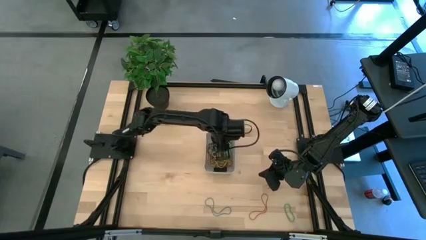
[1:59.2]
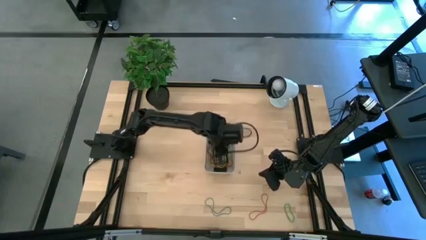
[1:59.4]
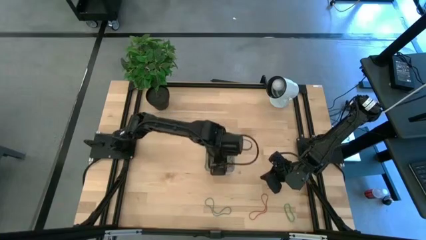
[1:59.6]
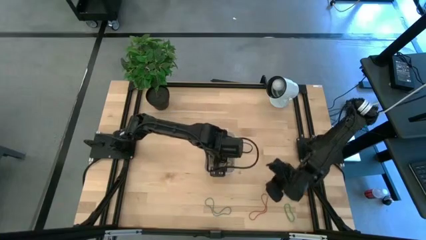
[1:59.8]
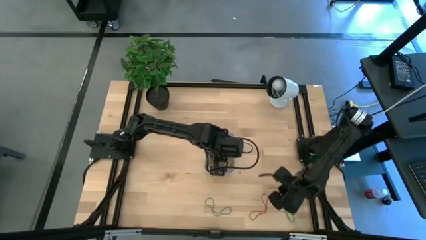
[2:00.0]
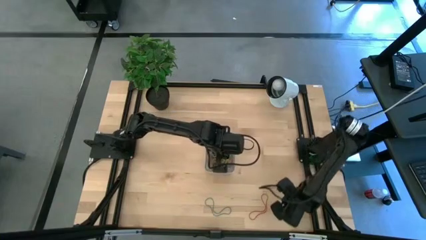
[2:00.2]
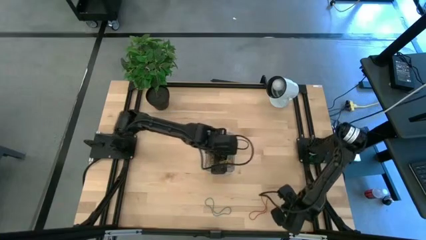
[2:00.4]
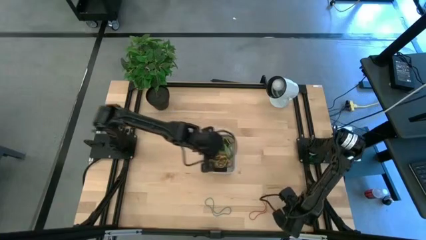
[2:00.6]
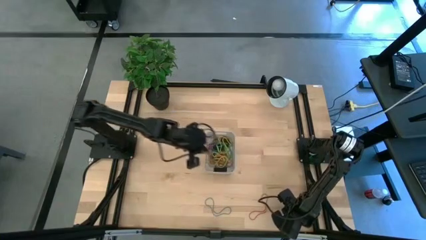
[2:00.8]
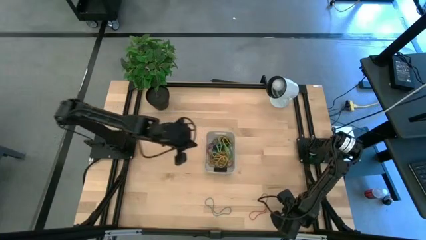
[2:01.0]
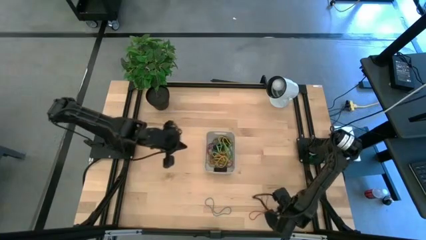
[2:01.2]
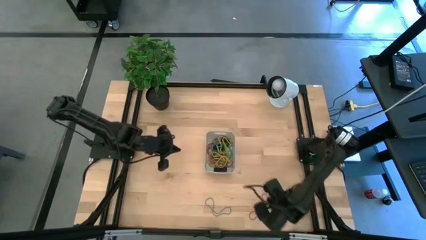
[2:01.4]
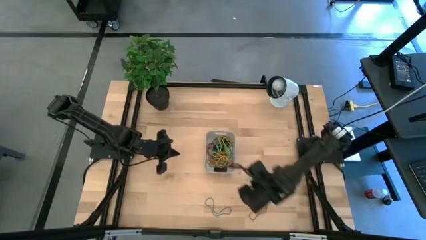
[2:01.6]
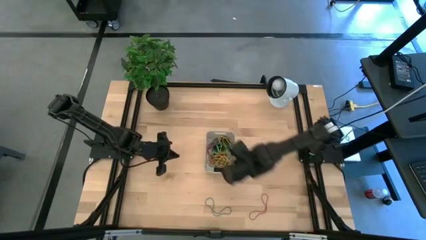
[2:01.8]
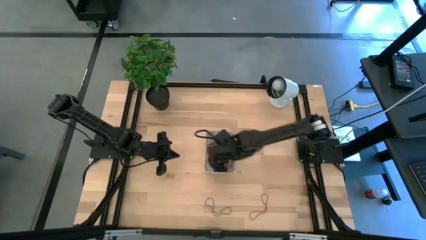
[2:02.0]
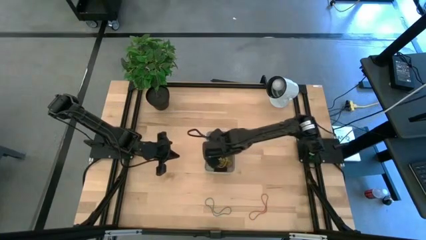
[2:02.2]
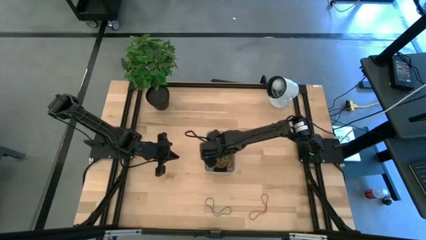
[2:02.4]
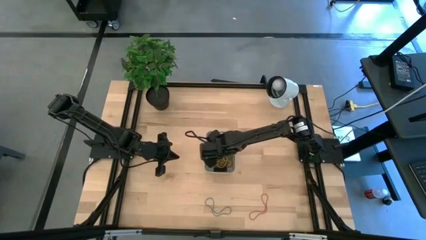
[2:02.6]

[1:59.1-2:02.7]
Task: Pick and place rubber bands into bin
Put the green rubber band into the gray bin

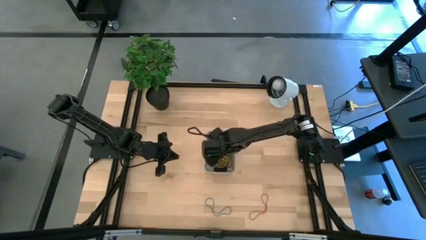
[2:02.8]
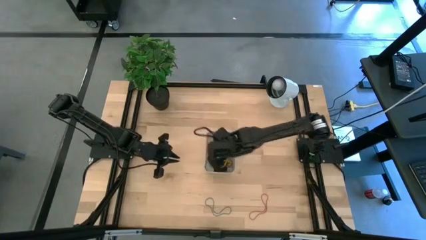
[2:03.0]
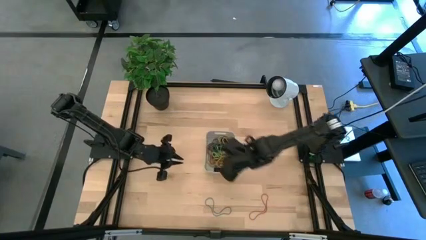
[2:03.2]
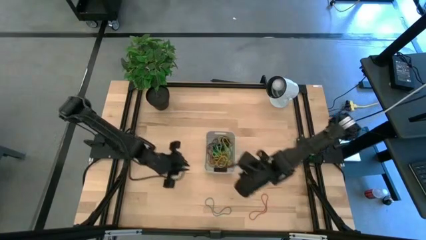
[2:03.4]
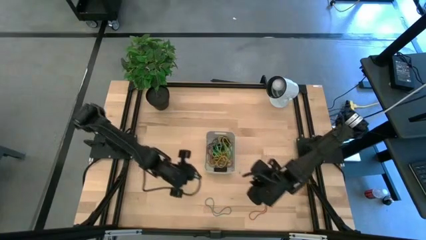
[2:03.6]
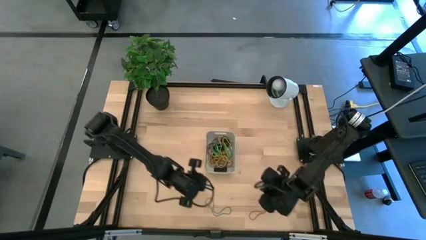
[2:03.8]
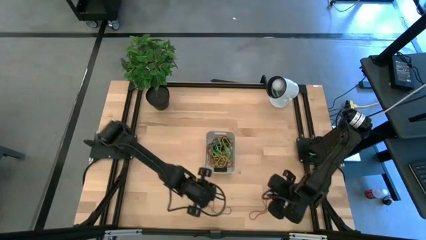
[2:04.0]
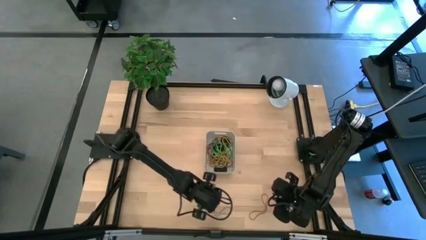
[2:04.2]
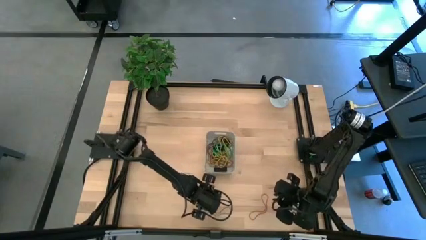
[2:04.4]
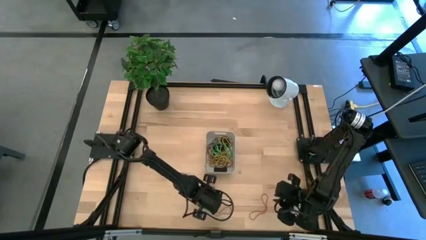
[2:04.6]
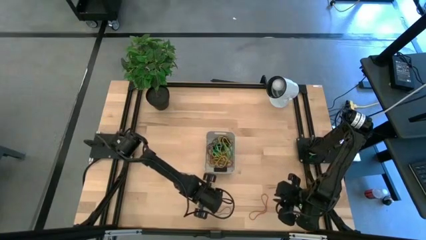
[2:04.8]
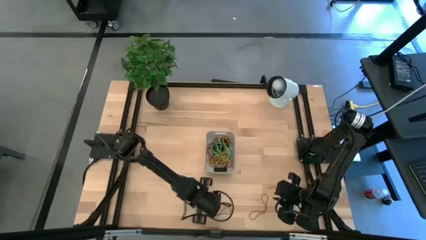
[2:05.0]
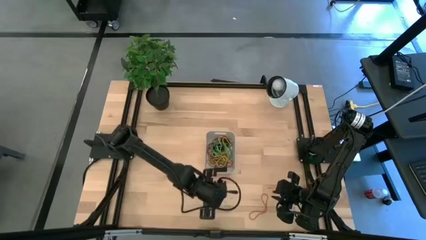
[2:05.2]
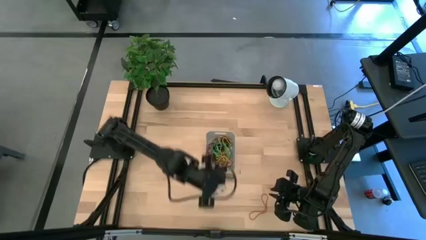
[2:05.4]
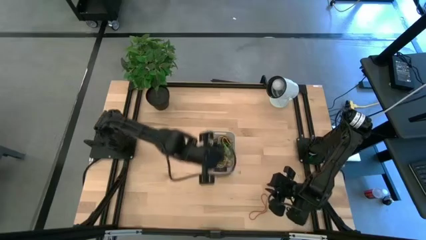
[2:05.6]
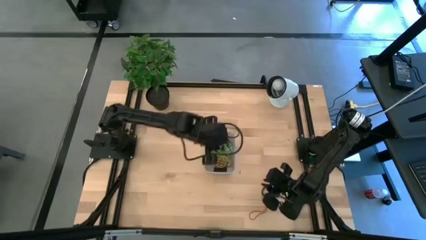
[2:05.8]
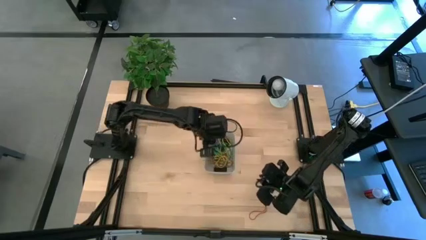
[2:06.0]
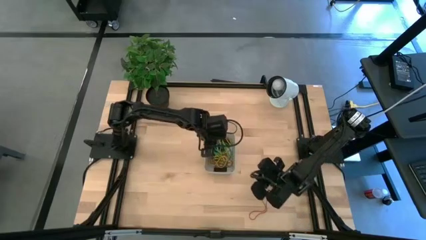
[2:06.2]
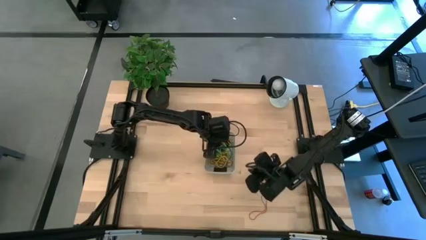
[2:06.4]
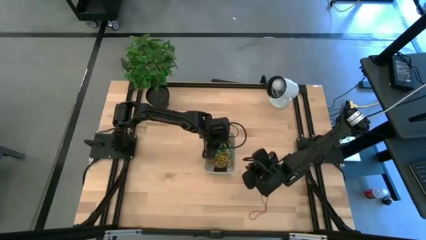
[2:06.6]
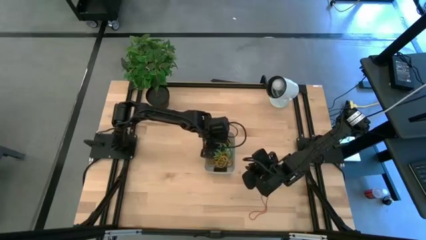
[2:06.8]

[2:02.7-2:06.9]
Put the blue rubber band into the gray bin

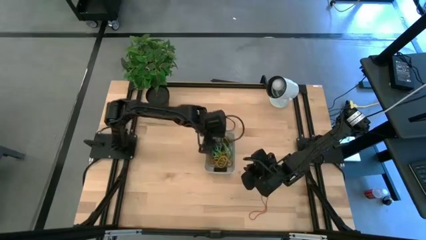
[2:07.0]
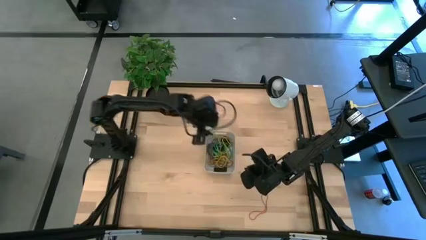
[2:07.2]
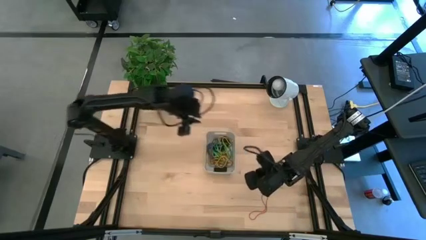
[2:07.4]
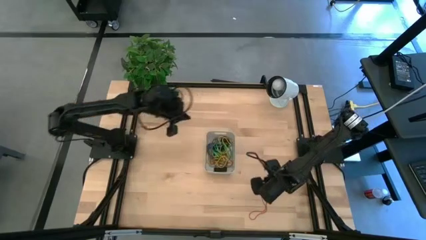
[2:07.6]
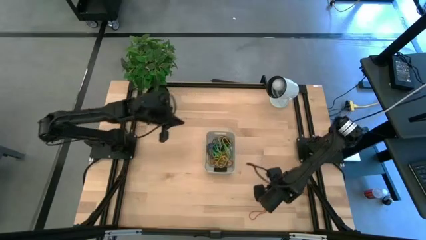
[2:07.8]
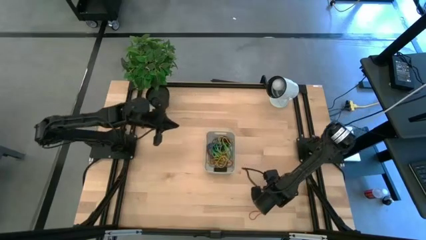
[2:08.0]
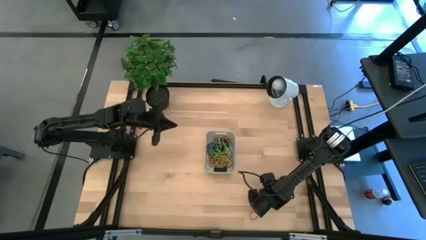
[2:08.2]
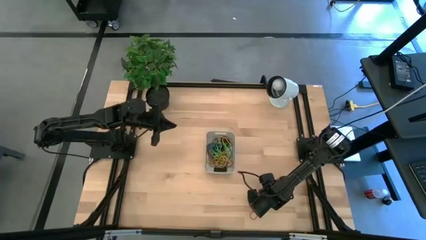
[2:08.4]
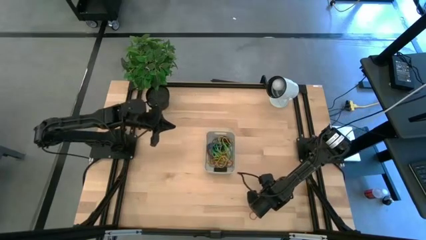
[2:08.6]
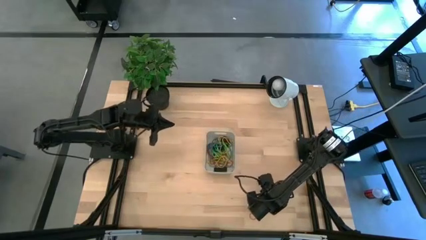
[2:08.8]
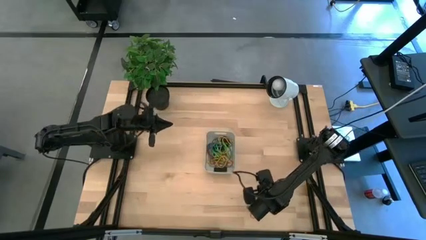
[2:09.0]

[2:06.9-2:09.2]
Put the red rubber band into the gray bin

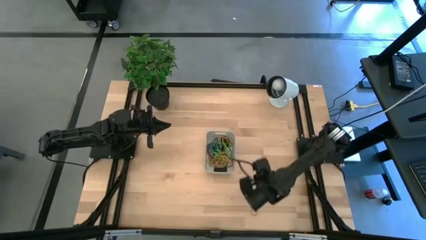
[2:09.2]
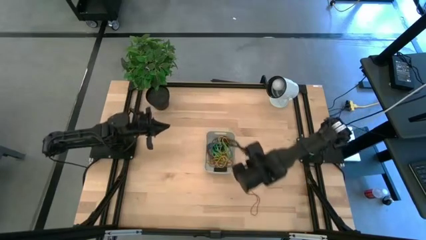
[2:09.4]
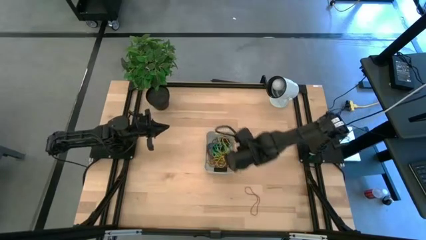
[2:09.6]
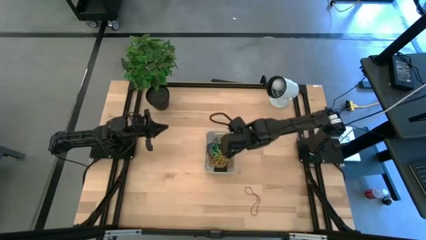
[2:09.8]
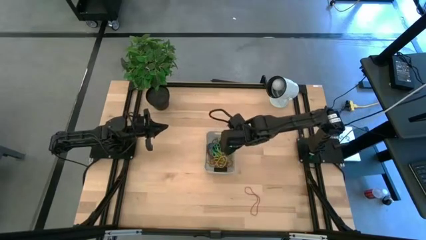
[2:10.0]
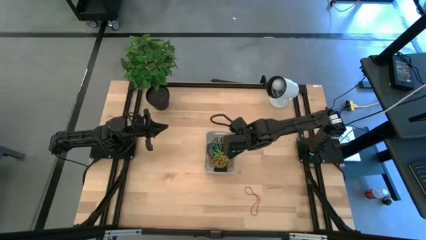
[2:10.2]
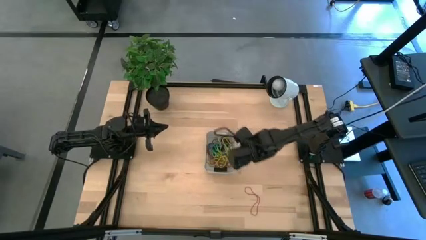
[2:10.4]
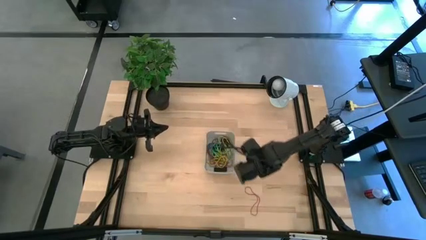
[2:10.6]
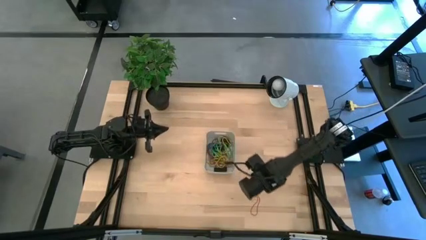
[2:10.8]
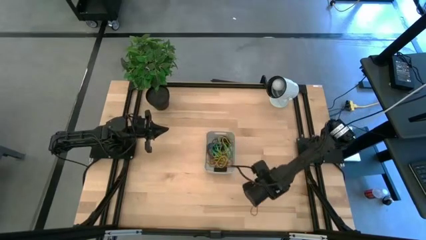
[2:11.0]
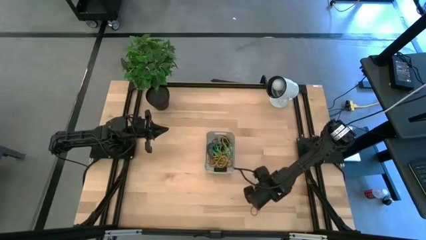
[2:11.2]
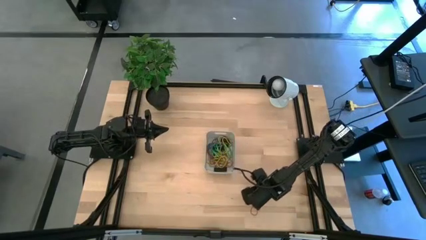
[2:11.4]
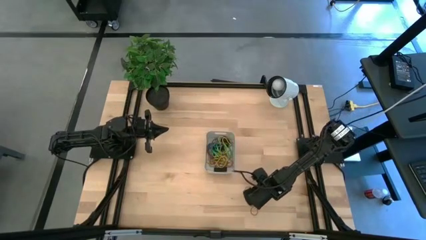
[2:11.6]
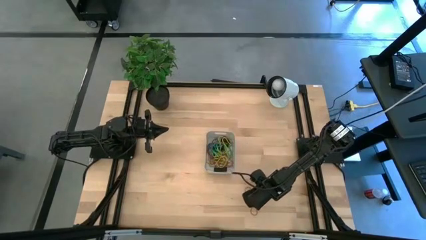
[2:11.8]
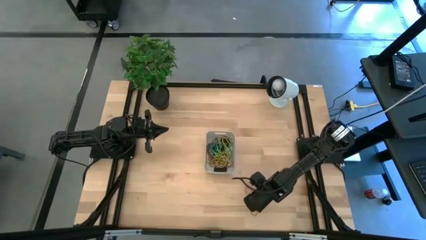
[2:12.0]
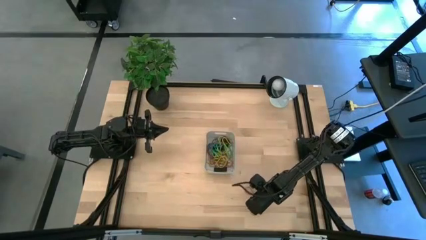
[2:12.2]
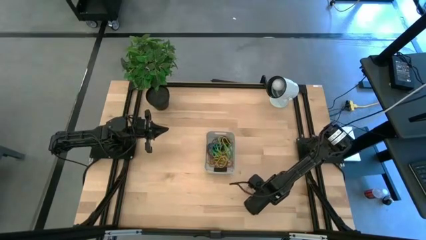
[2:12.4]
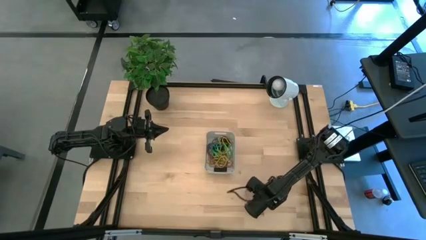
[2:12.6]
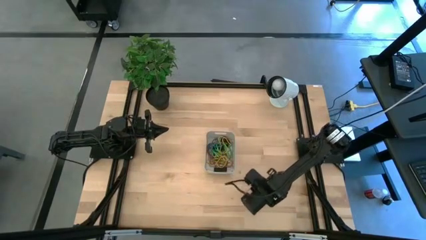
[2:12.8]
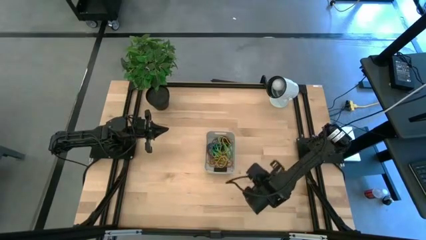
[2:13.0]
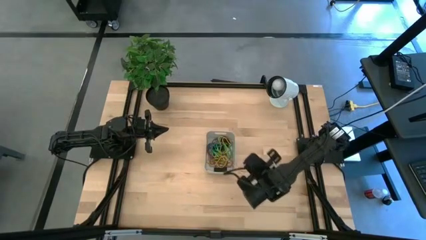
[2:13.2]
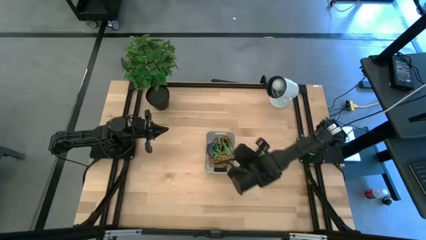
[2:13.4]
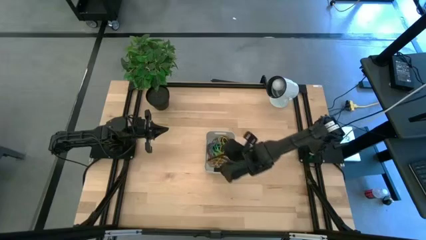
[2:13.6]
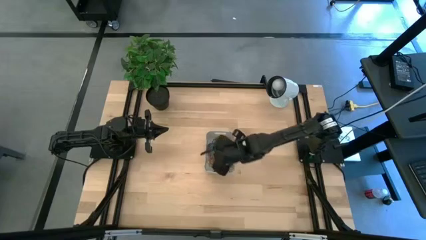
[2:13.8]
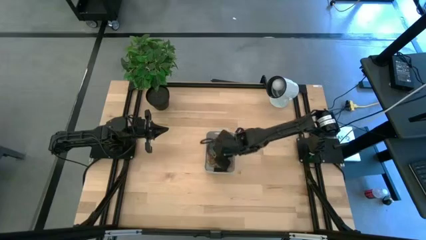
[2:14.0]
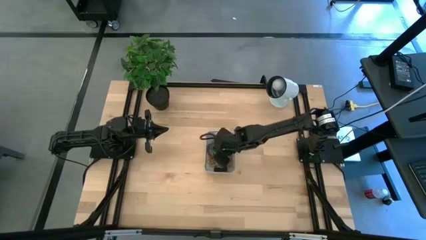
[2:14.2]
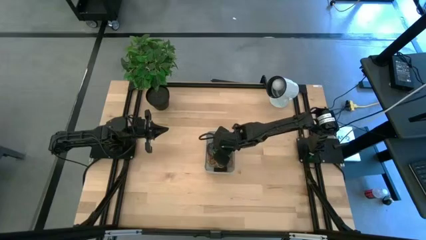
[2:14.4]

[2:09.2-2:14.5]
Put the red rubber band into the gray bin
